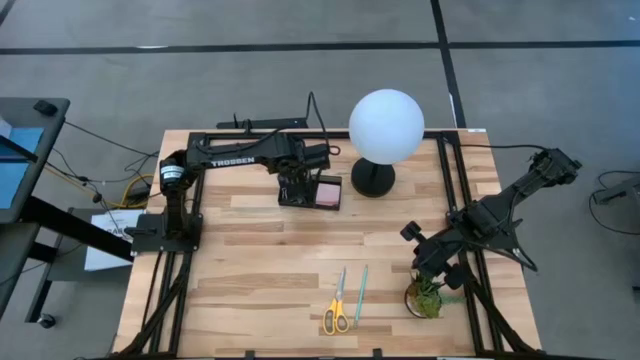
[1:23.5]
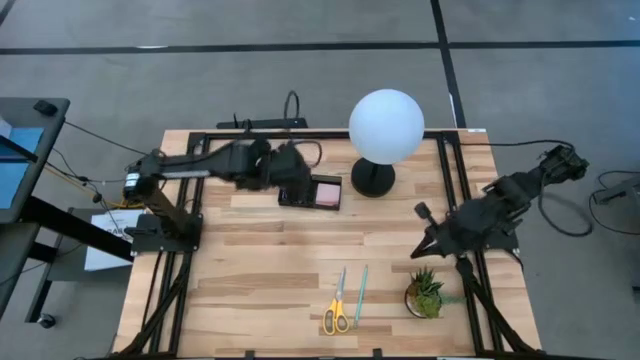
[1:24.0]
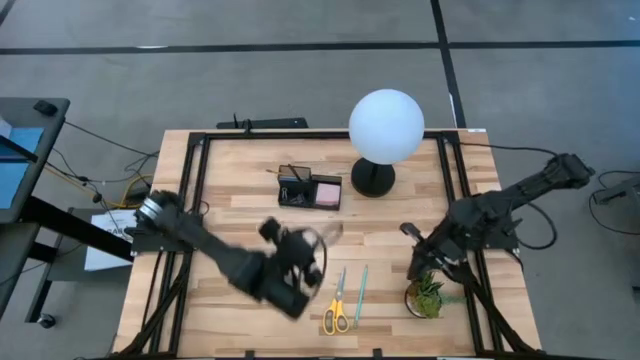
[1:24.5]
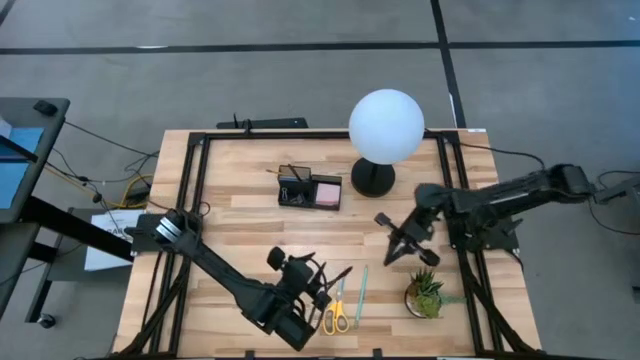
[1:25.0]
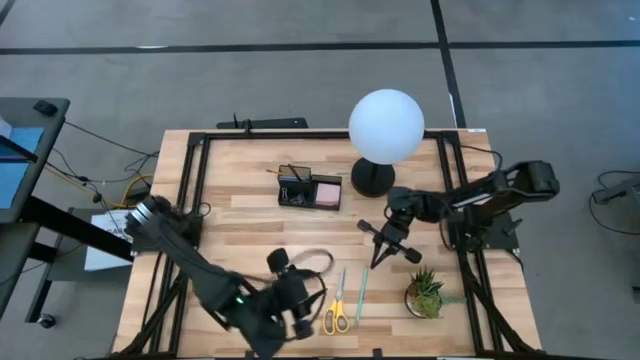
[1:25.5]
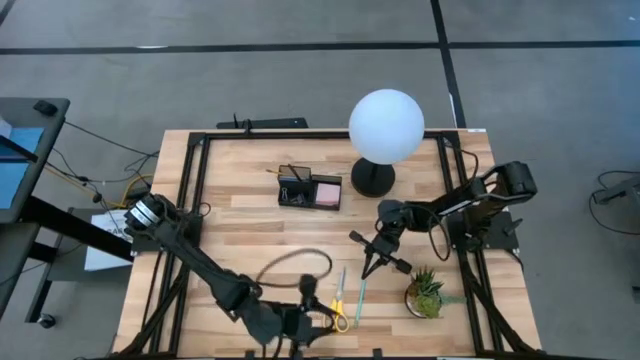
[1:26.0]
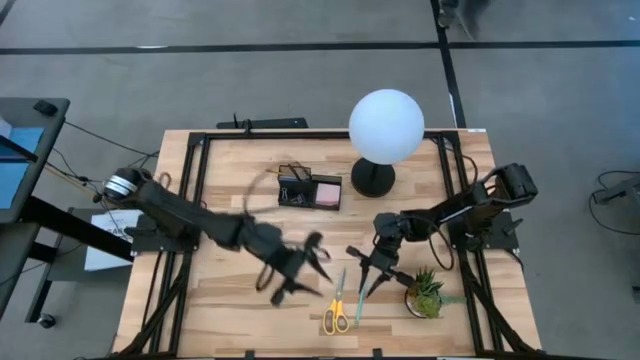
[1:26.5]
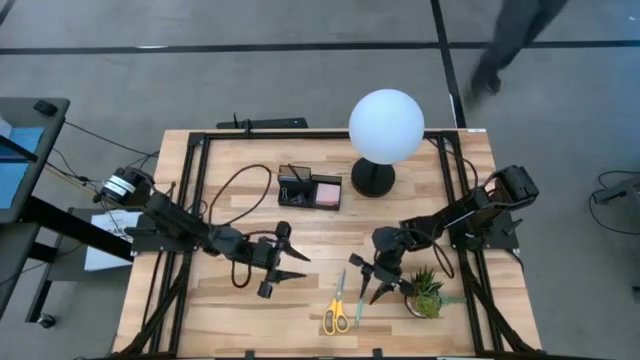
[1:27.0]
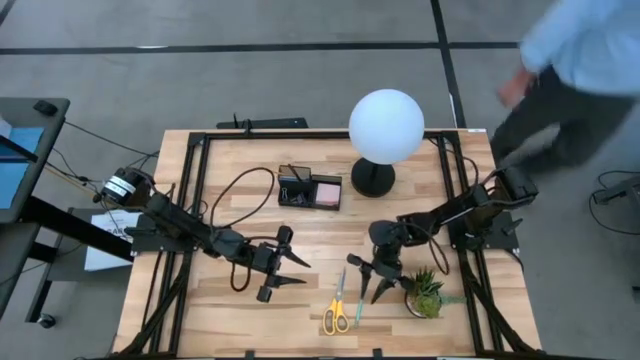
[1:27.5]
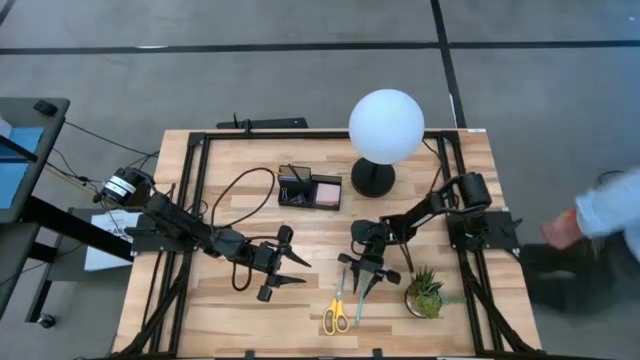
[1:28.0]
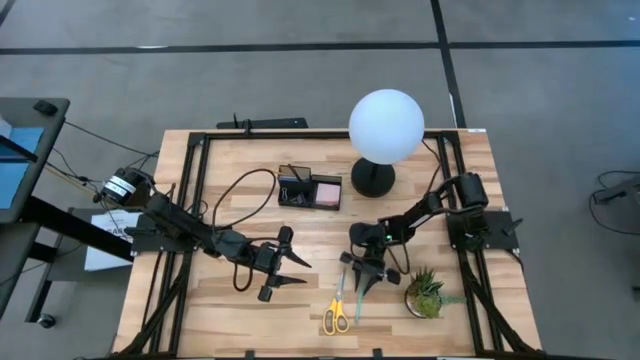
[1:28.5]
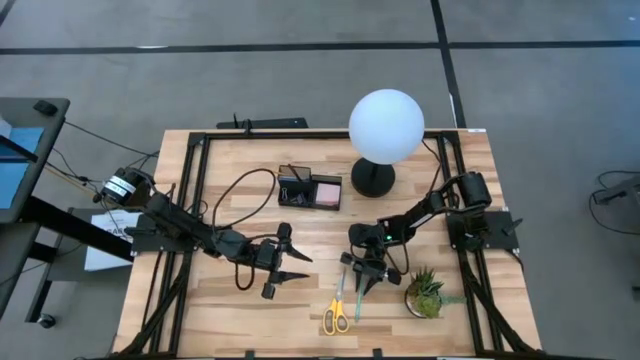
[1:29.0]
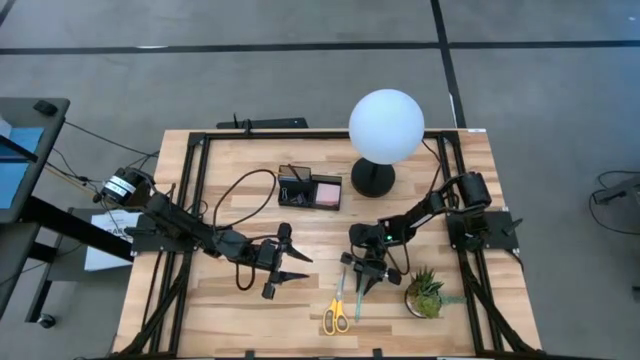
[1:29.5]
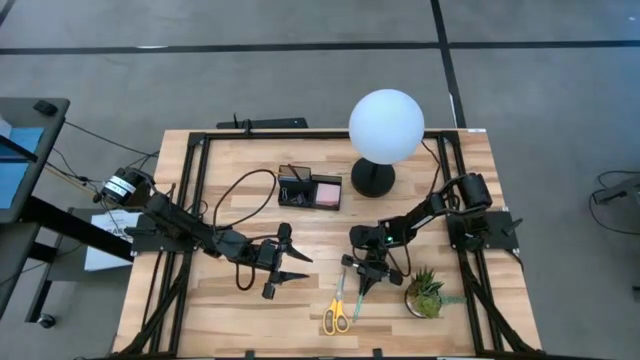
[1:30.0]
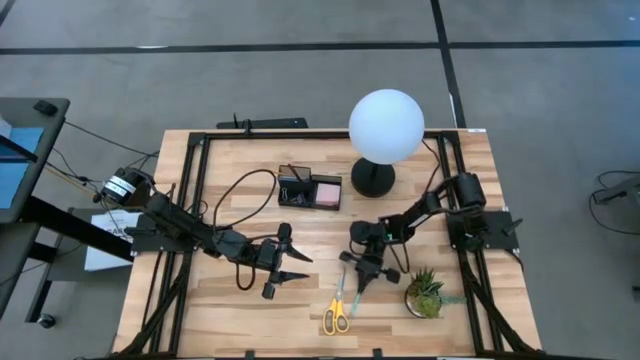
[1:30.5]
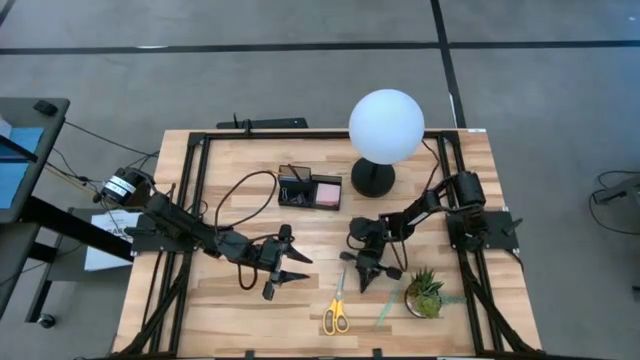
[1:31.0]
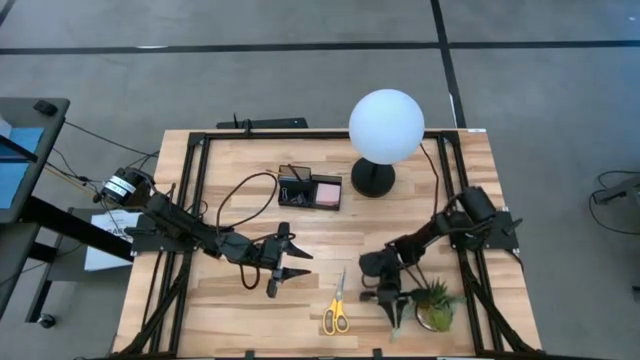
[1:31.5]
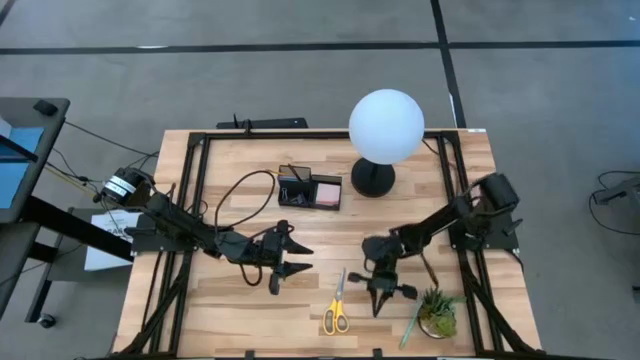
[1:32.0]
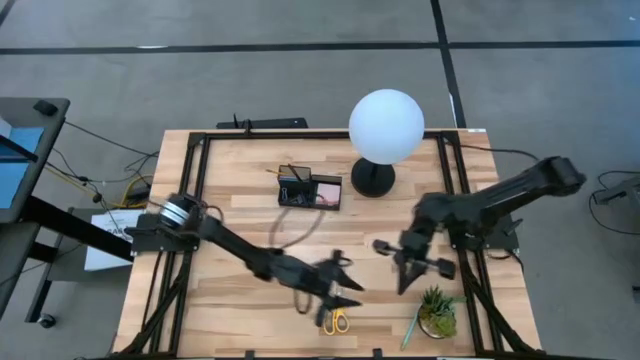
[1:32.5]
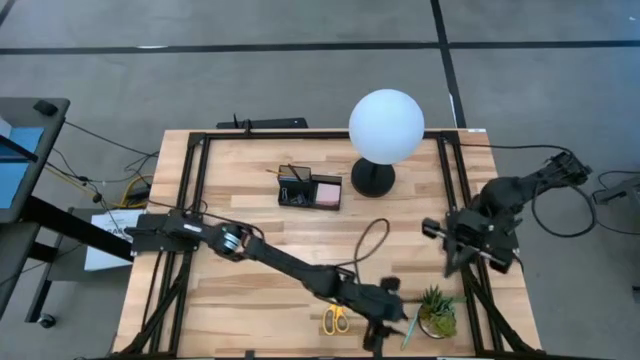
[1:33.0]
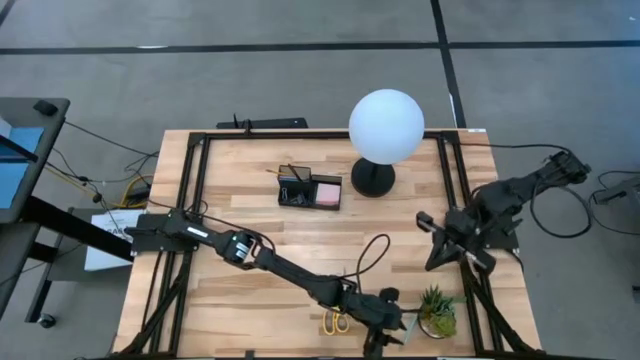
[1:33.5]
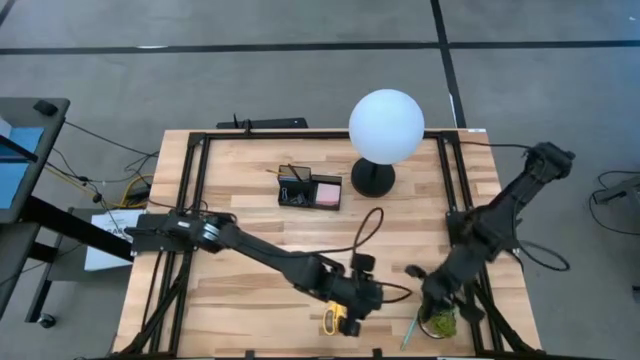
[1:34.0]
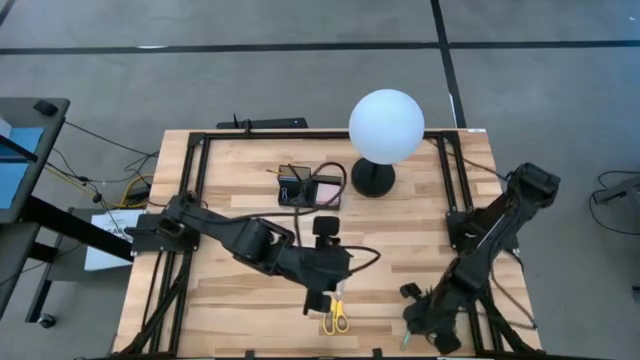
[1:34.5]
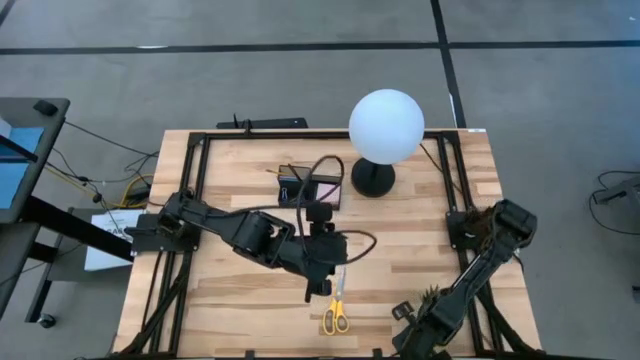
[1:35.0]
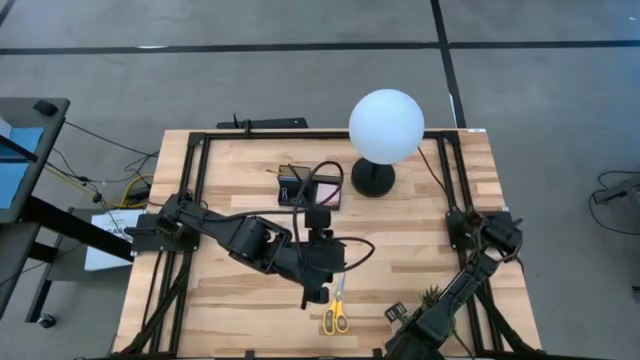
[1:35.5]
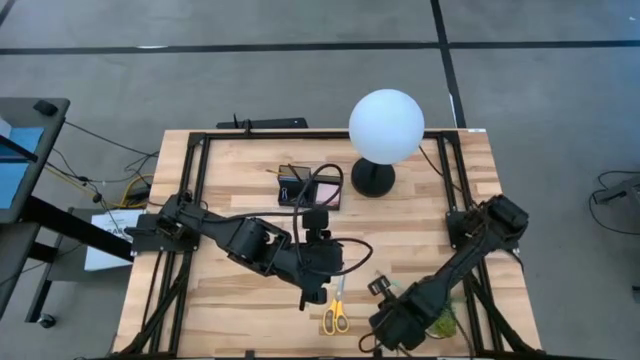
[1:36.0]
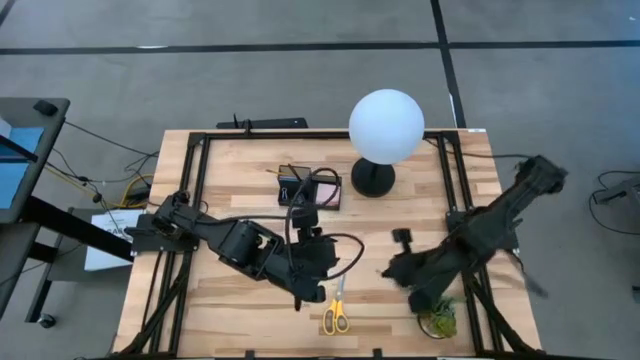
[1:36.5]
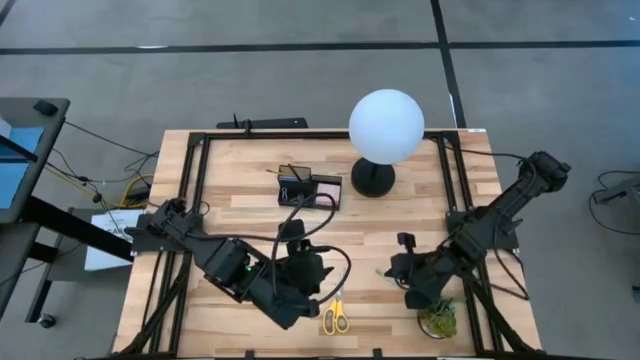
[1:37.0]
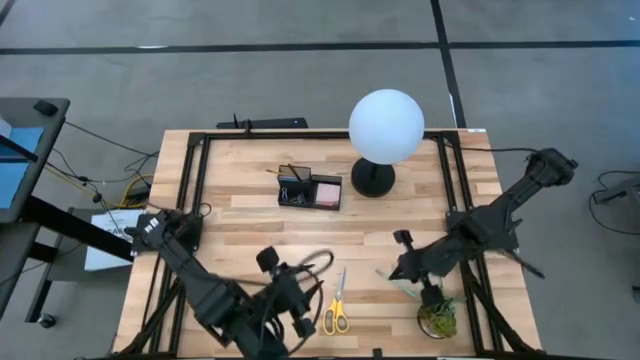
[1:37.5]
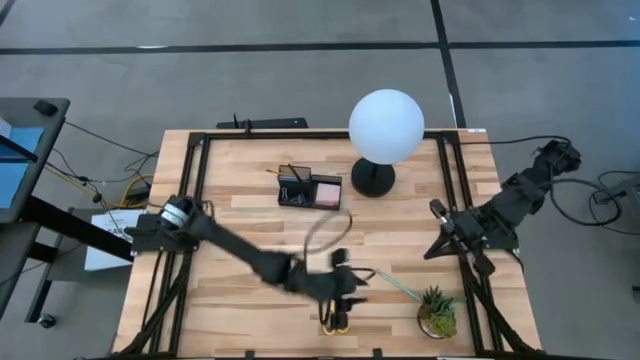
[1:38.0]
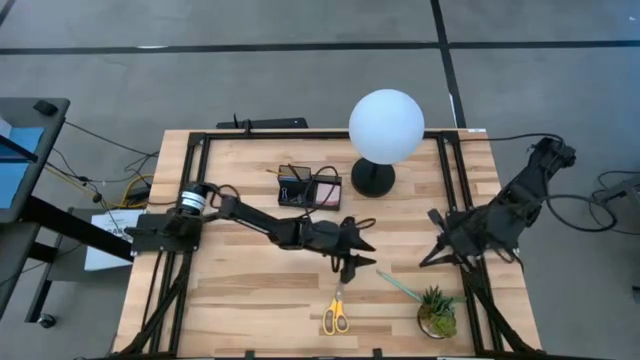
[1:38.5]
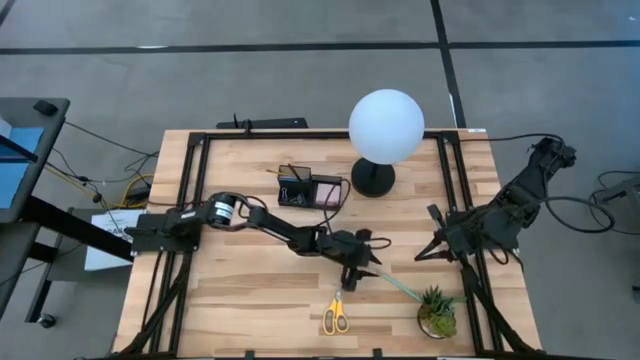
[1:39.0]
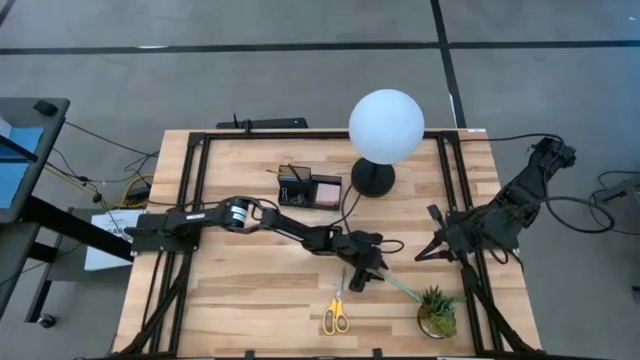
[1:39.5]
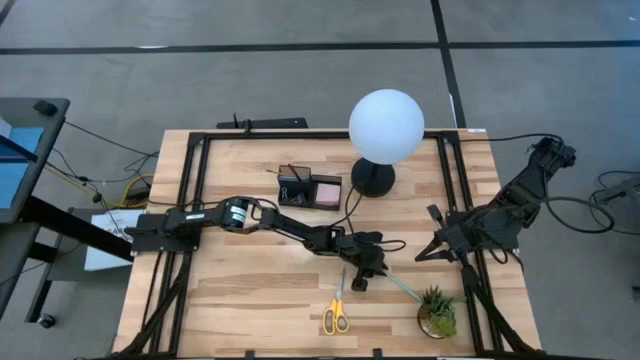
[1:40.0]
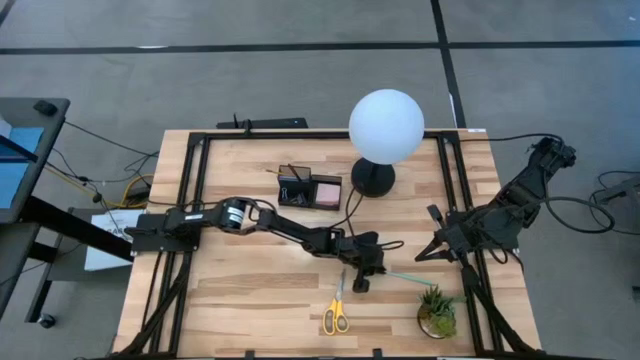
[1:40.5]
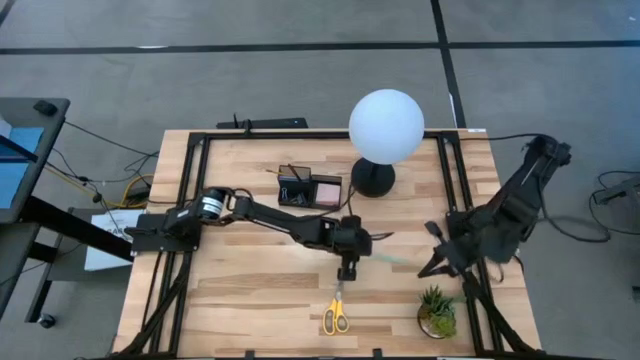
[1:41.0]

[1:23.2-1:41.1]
Task: Pick and place office supplies into organizer
Put the blue pencil into the black desk organizer

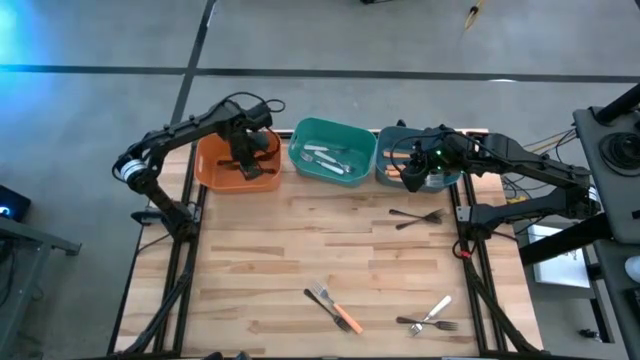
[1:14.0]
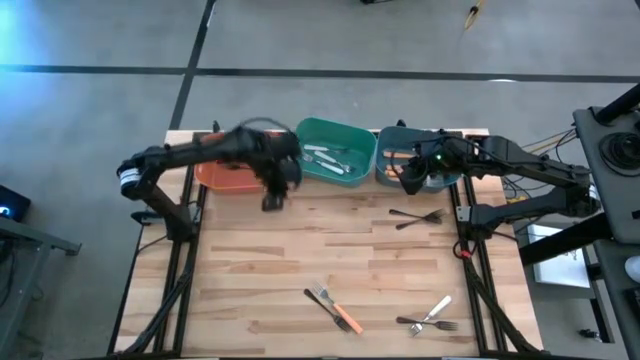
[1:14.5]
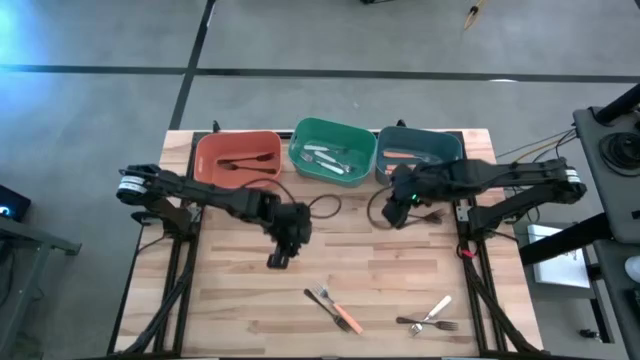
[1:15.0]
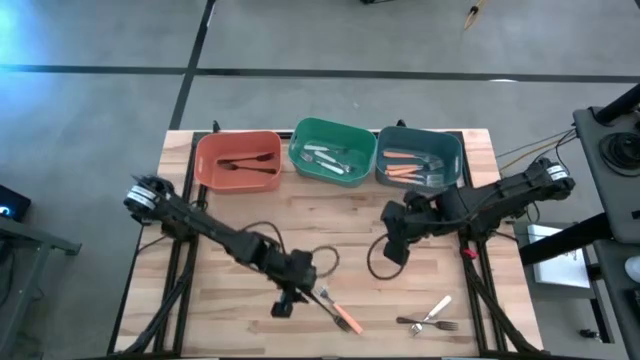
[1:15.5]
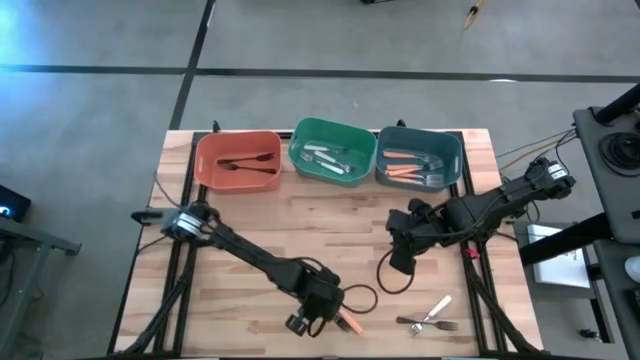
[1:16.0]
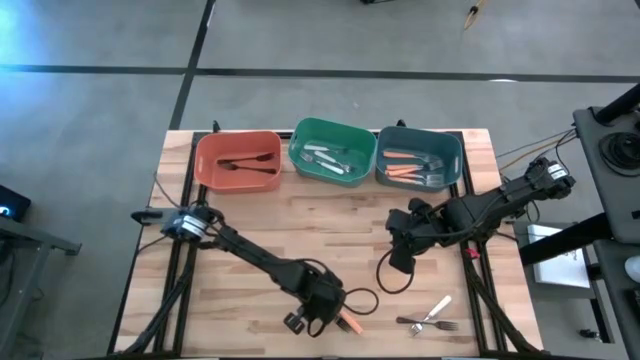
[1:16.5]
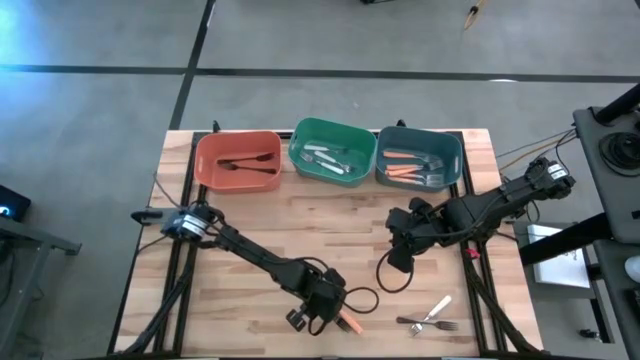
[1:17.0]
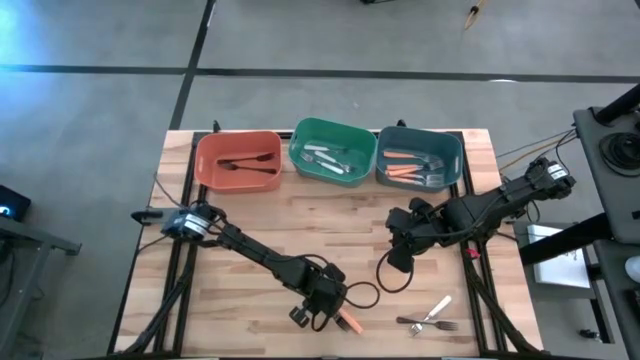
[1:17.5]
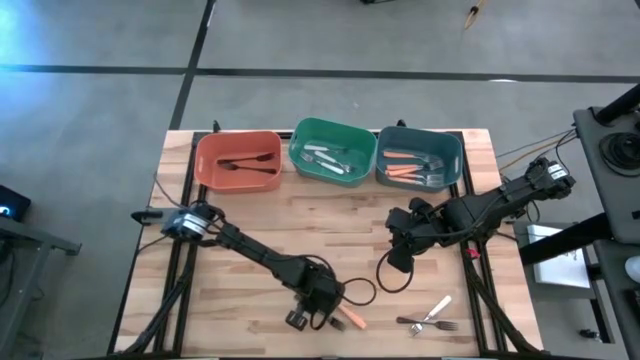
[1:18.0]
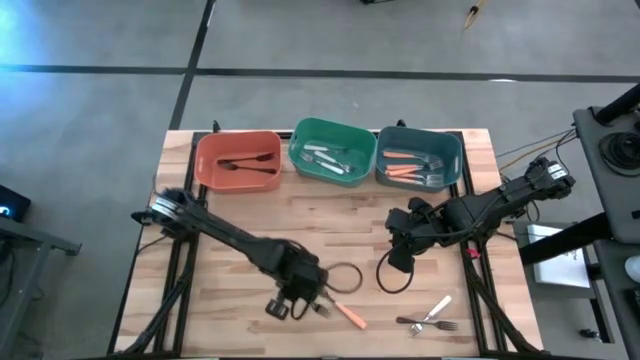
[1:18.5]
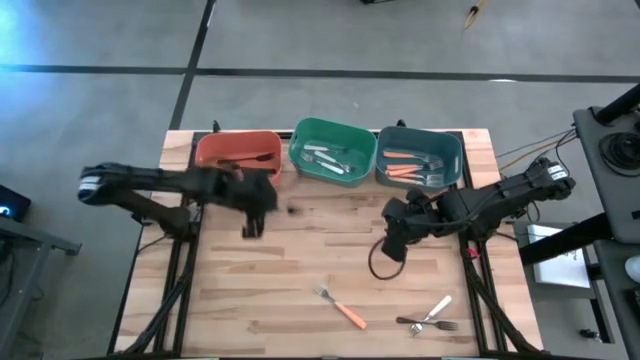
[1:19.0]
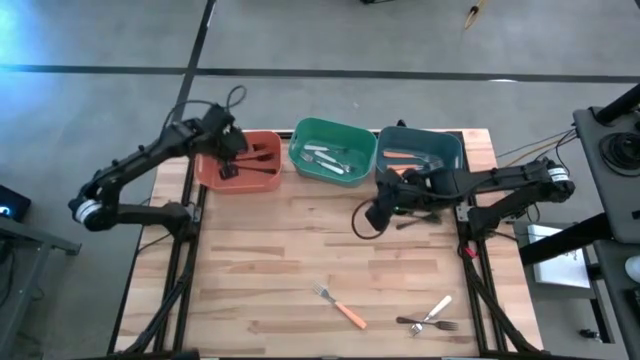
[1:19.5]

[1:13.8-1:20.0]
Task: Sort silverware by color (type)
Put the black fork into the orange bin
